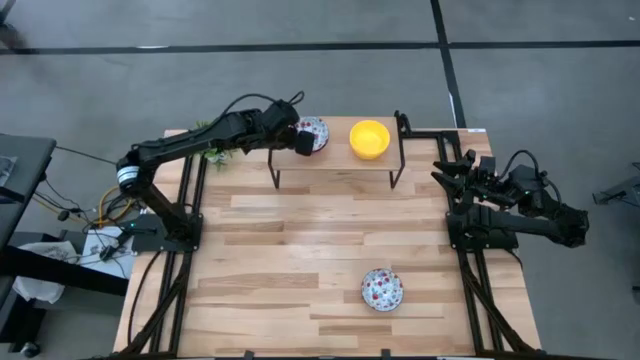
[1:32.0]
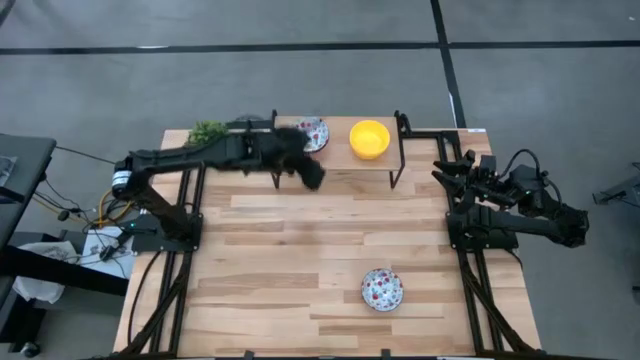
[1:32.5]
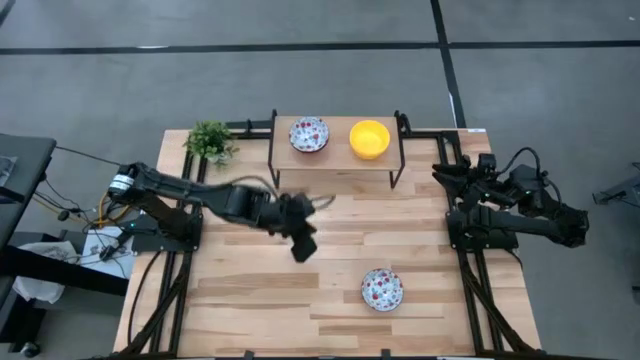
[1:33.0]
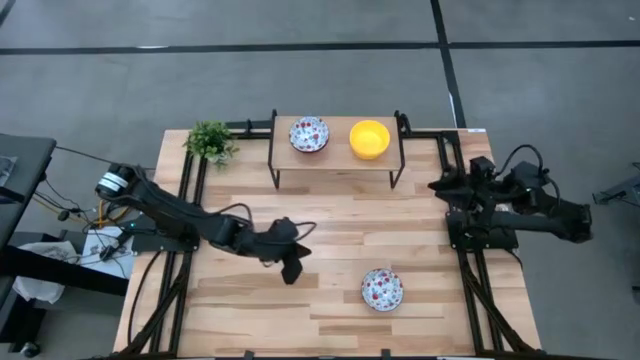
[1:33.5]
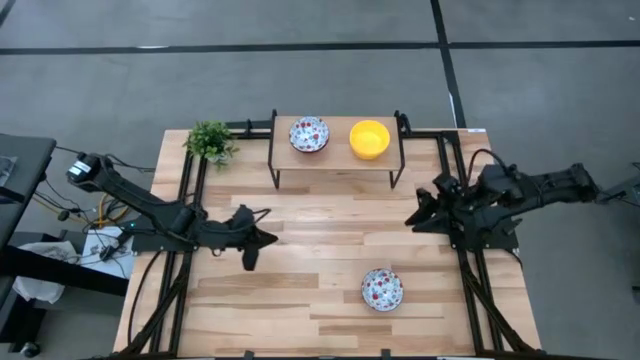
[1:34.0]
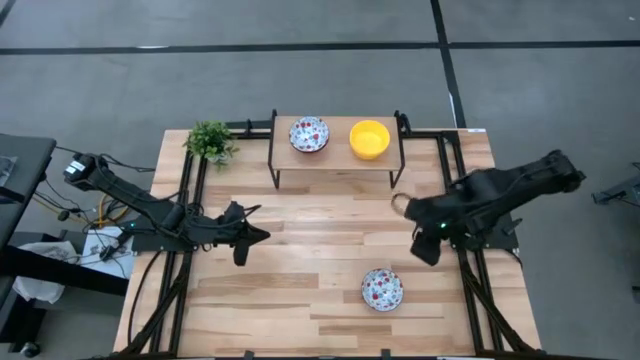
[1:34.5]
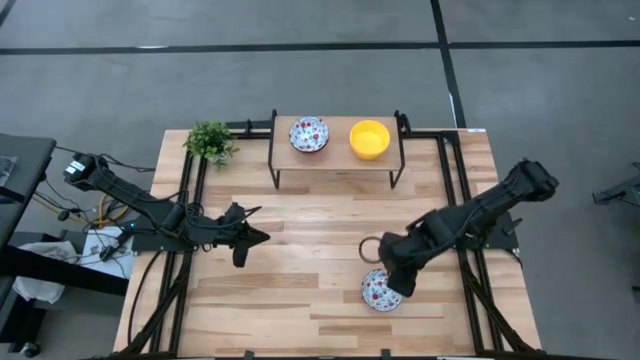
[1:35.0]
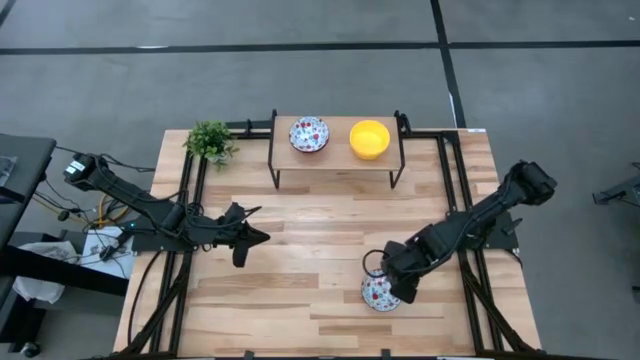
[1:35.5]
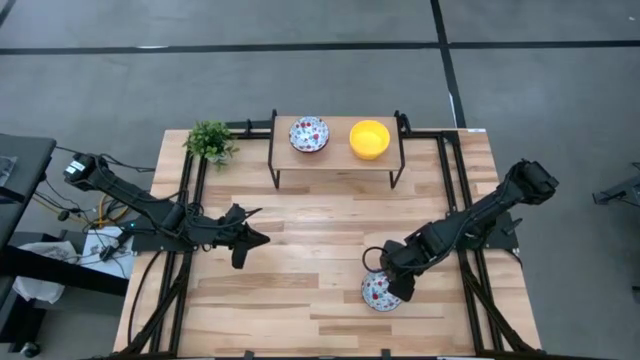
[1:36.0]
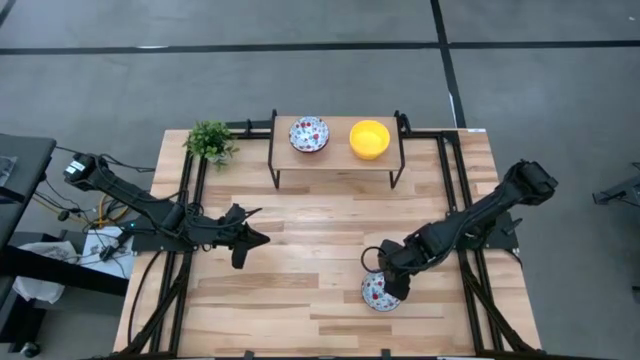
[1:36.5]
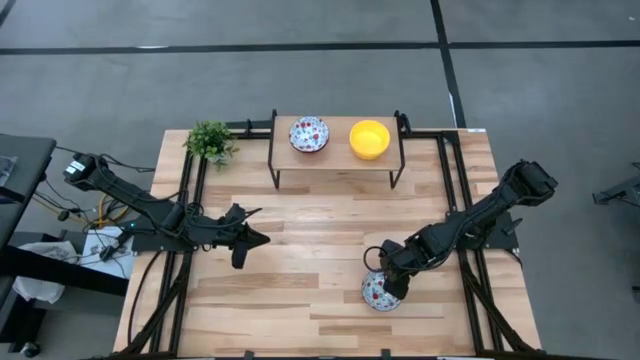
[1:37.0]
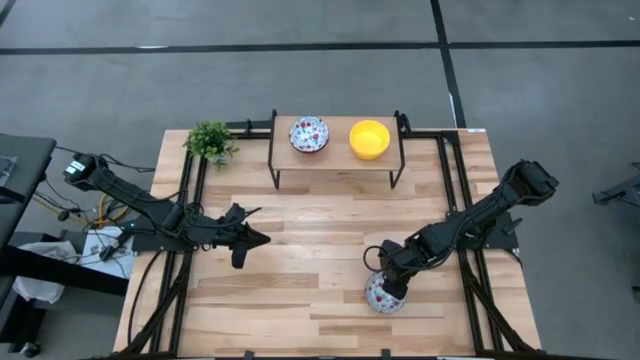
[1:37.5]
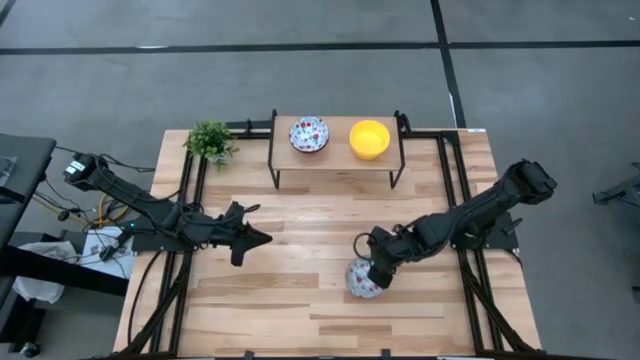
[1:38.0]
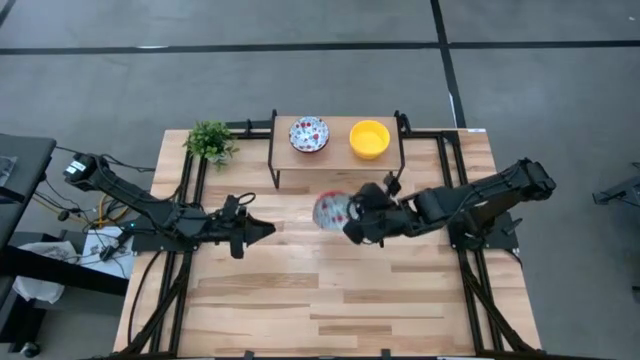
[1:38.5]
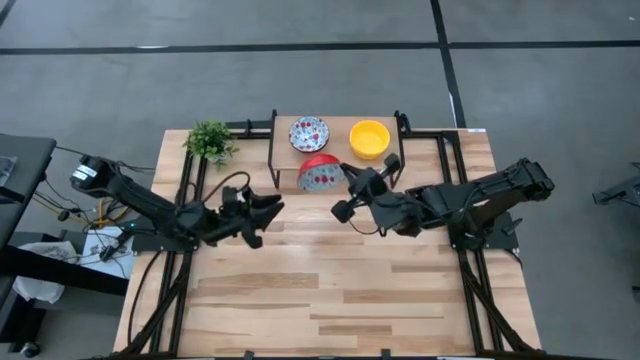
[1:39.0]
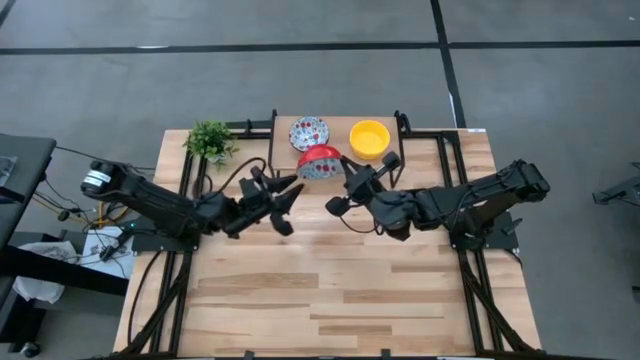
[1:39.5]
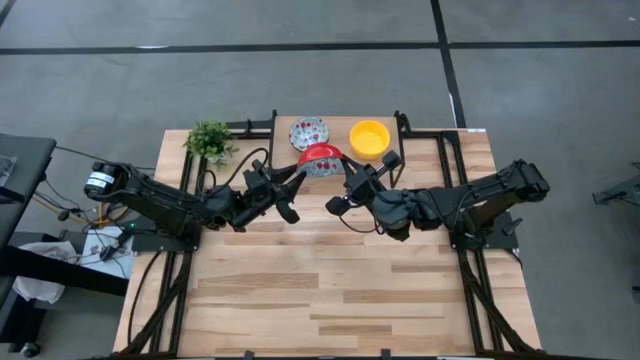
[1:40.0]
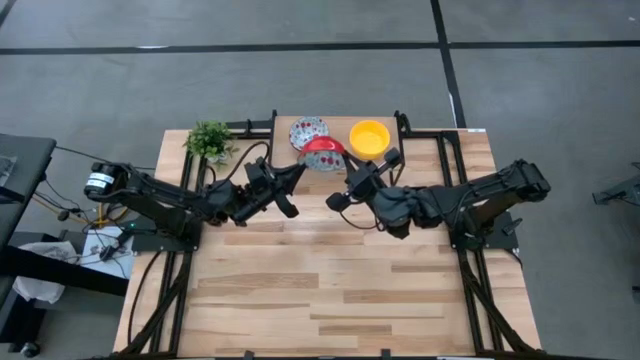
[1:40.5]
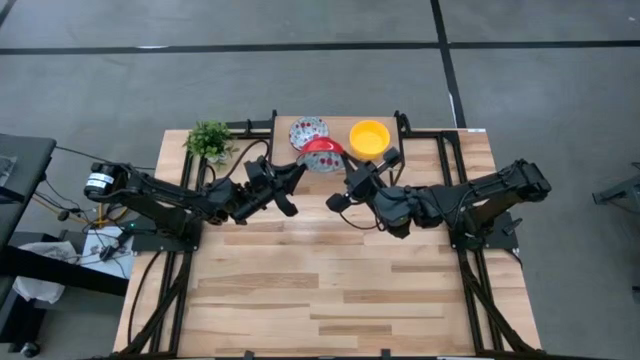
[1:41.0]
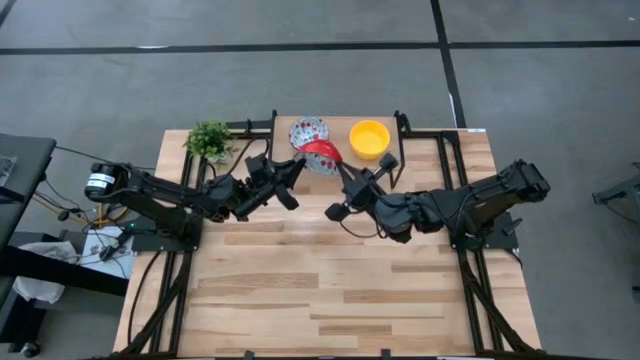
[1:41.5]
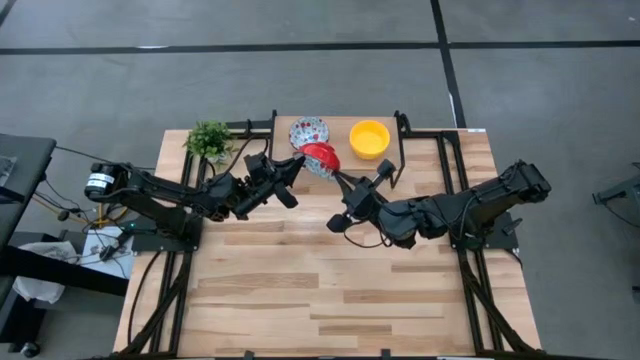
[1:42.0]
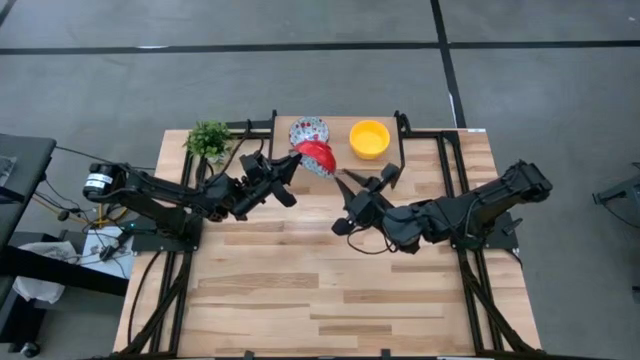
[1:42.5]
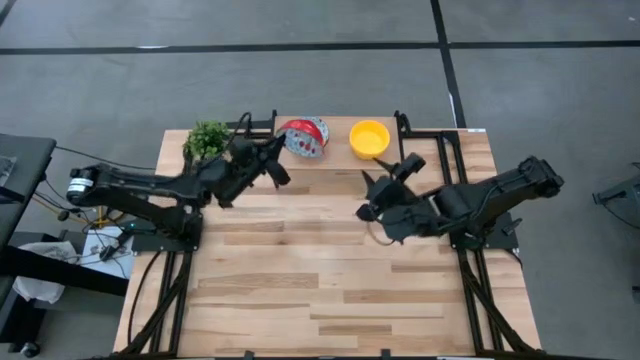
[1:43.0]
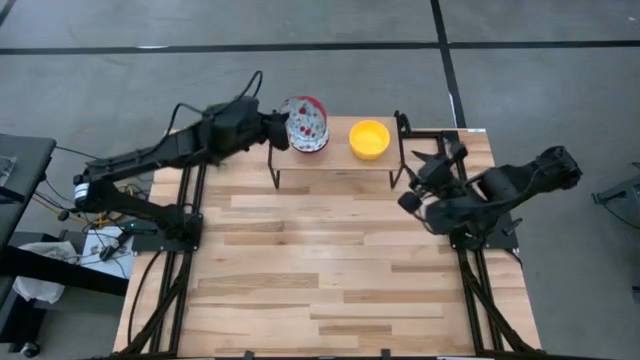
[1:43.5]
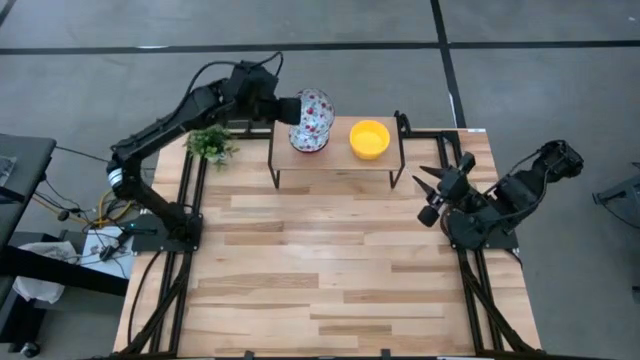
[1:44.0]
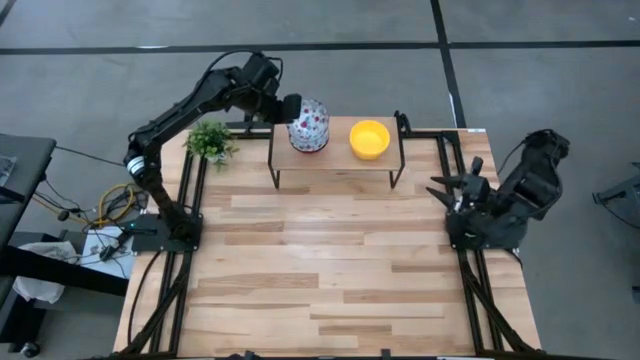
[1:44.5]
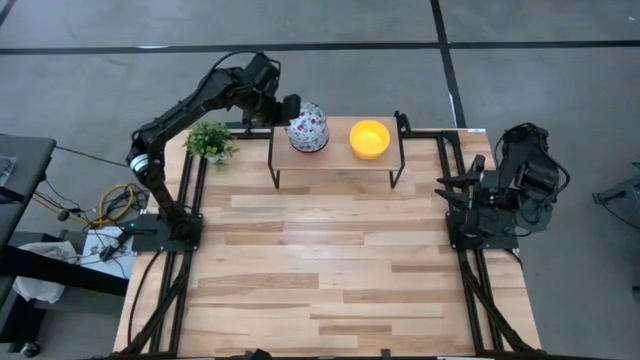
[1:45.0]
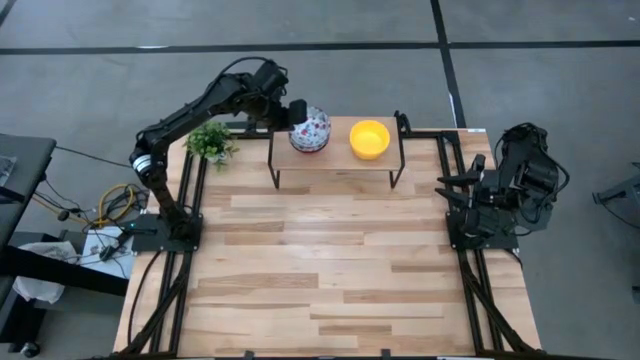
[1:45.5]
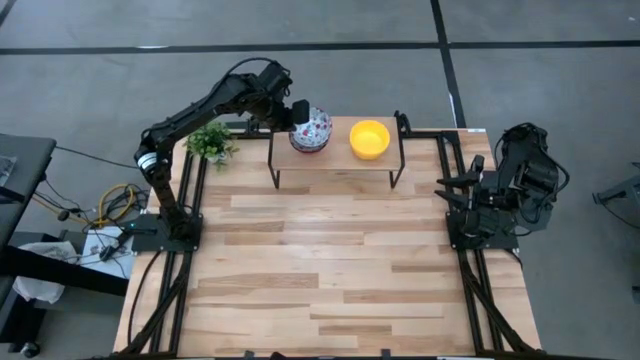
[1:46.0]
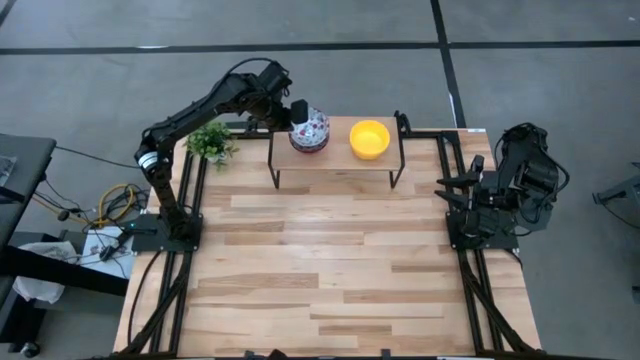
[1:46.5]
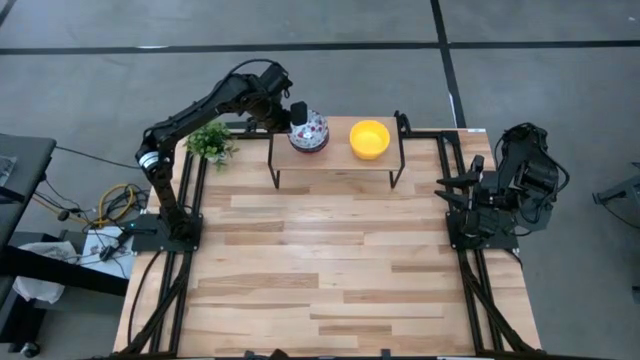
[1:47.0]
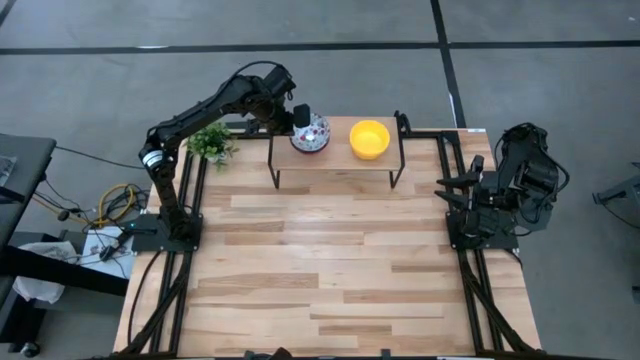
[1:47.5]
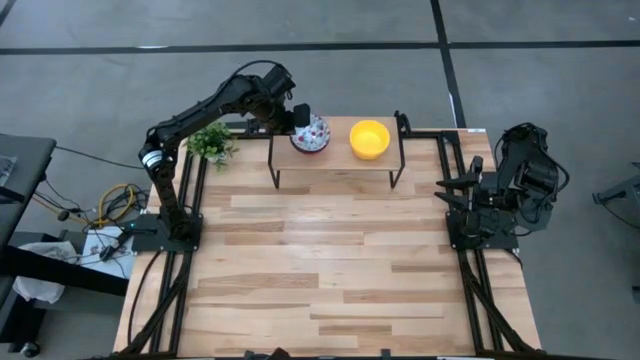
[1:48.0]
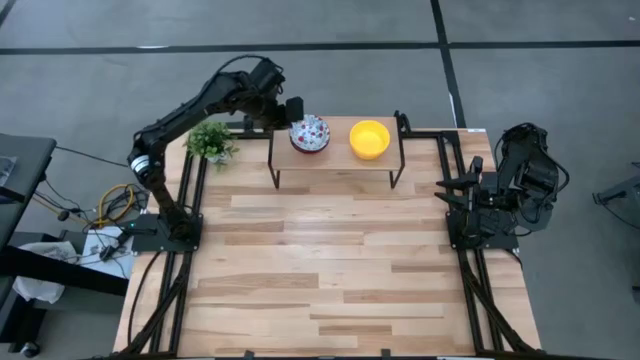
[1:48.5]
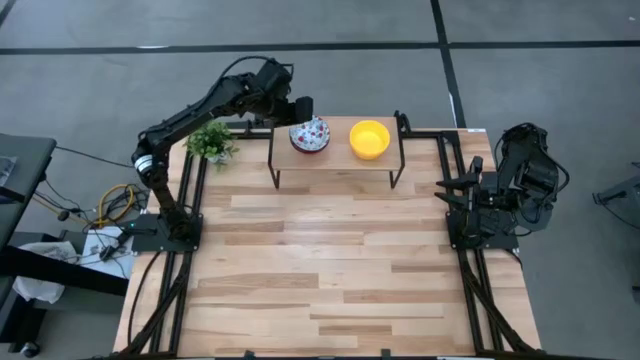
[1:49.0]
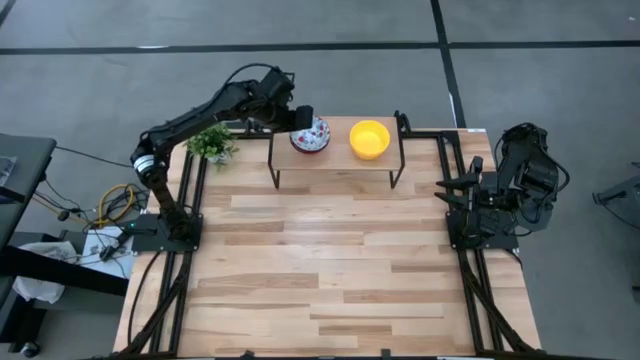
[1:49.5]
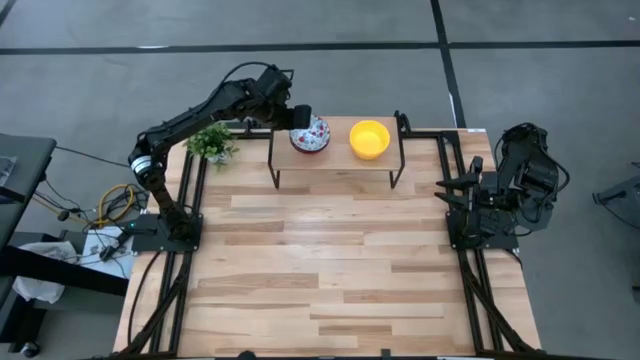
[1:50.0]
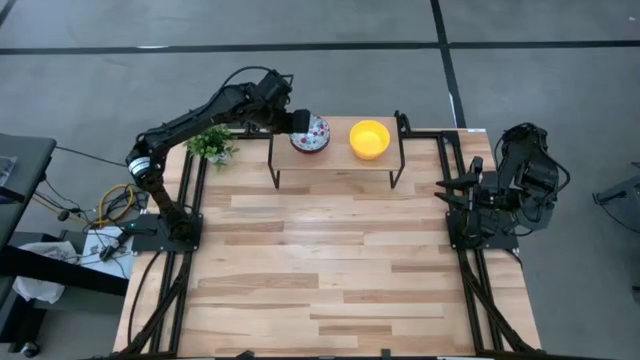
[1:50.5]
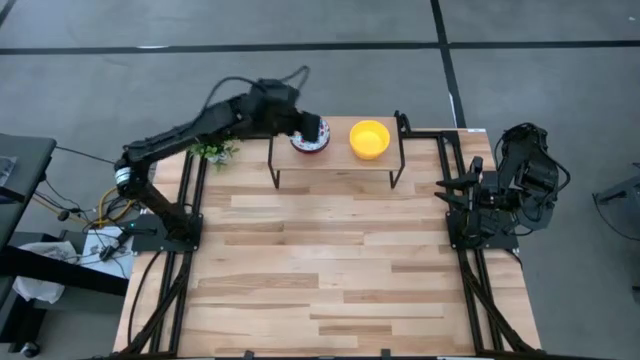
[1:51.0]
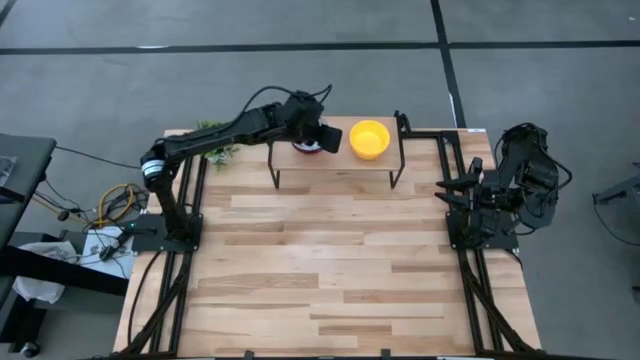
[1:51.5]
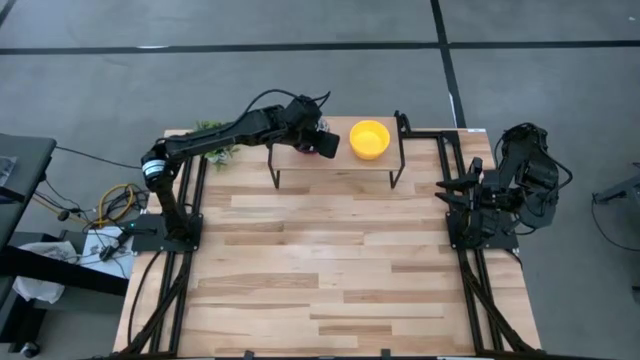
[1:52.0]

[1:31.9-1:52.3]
Task: Pick & Place Mini bowls
Stack the orange bowl on the orange bowl on the shelf
